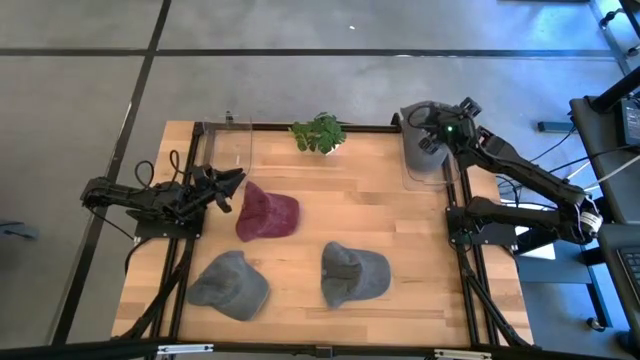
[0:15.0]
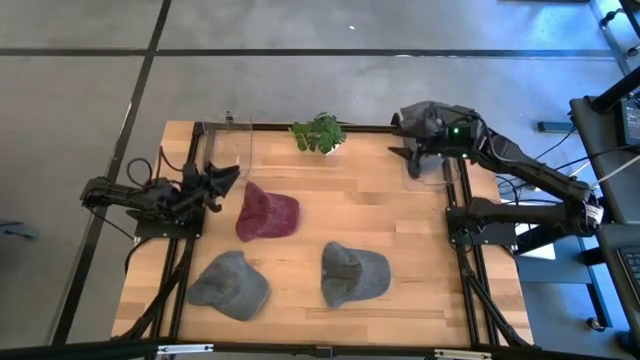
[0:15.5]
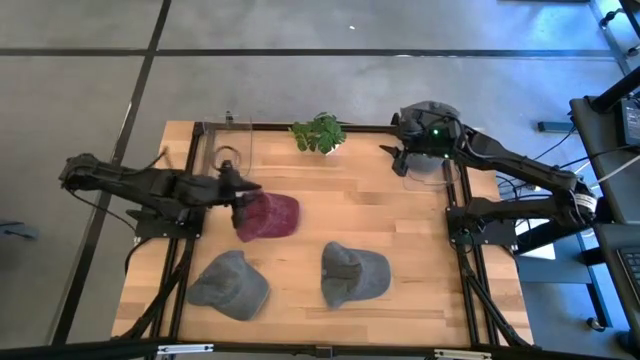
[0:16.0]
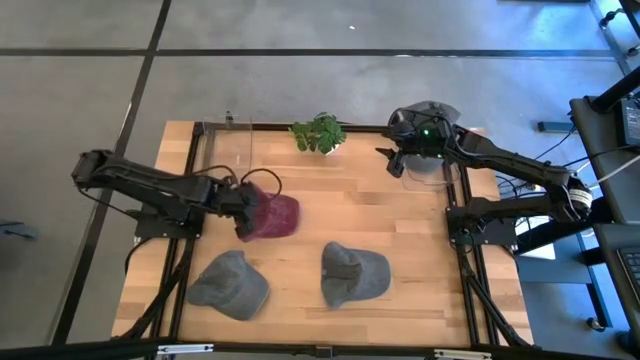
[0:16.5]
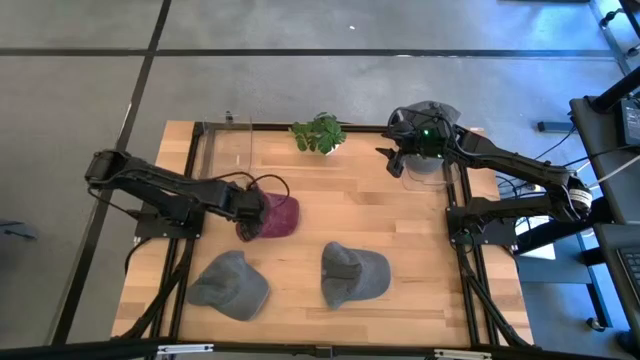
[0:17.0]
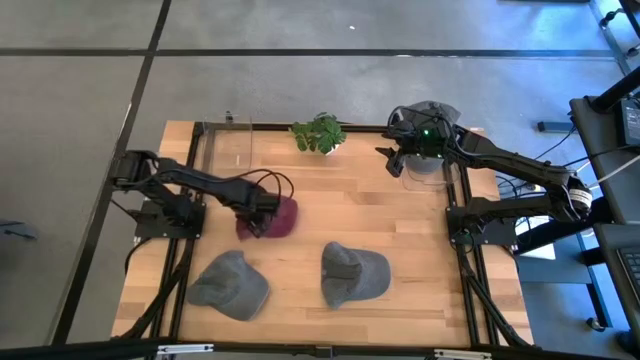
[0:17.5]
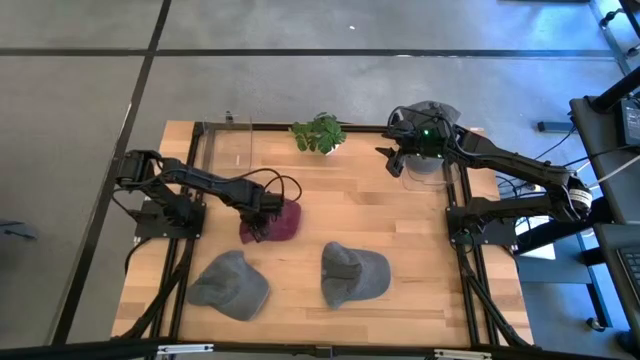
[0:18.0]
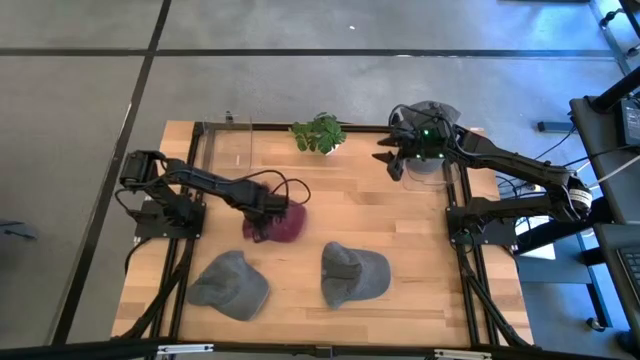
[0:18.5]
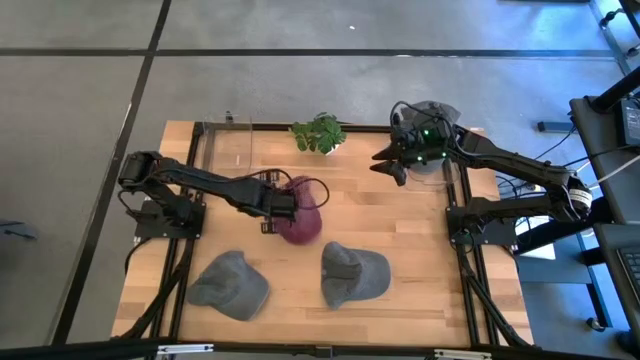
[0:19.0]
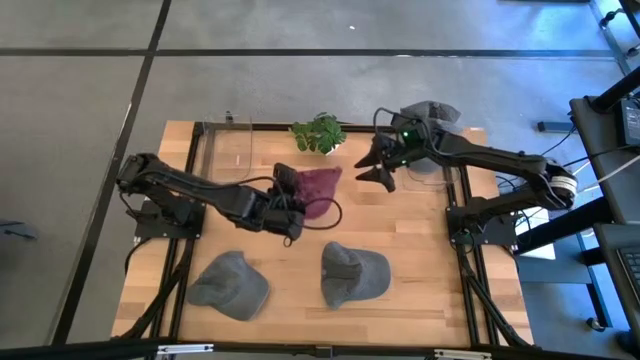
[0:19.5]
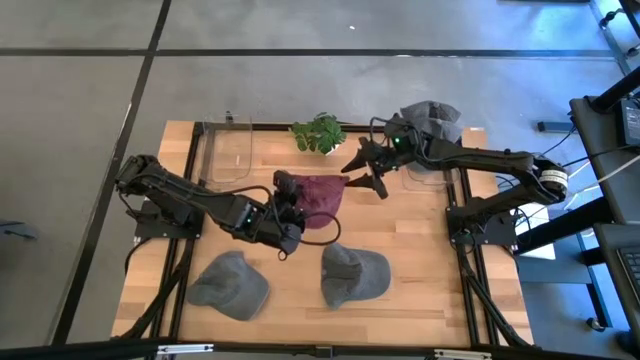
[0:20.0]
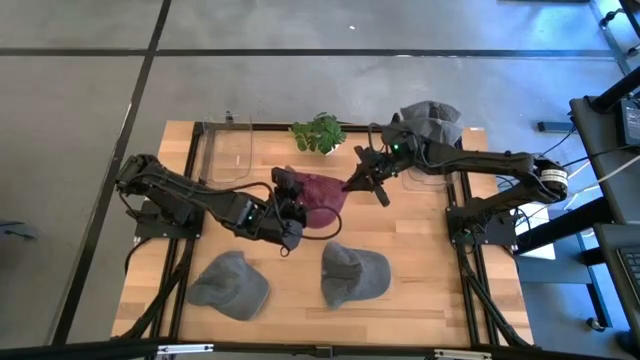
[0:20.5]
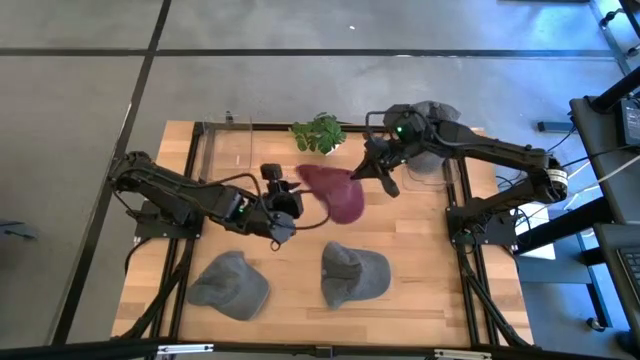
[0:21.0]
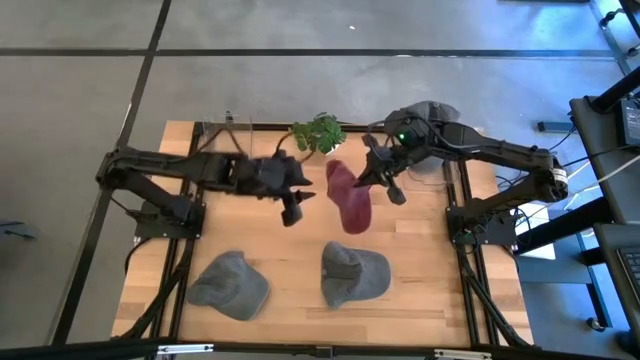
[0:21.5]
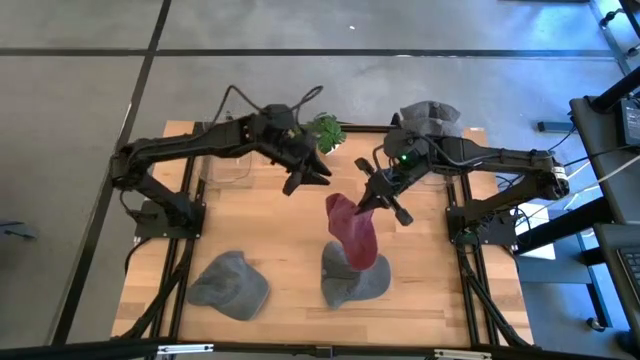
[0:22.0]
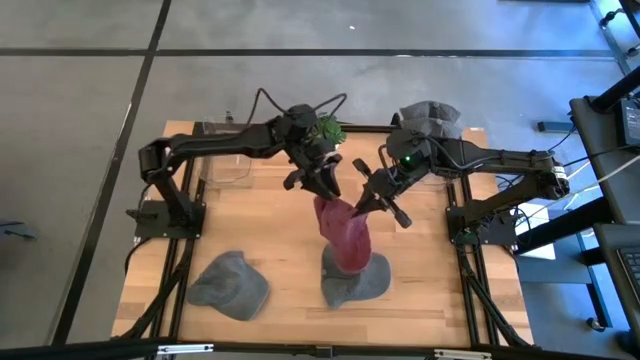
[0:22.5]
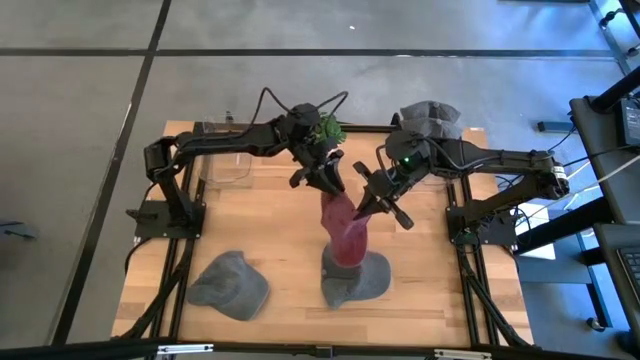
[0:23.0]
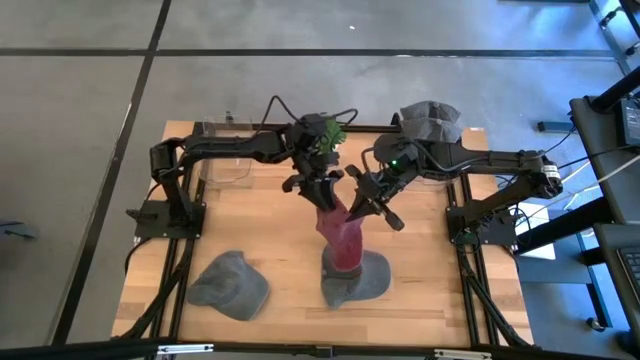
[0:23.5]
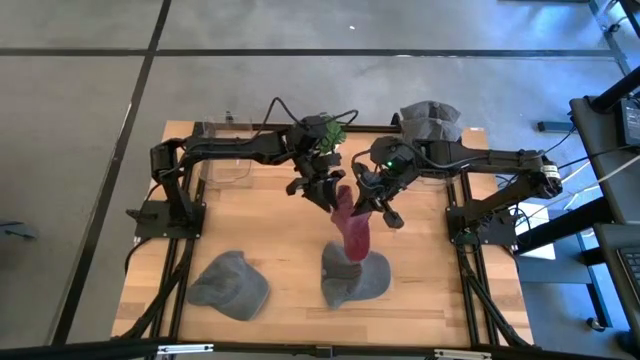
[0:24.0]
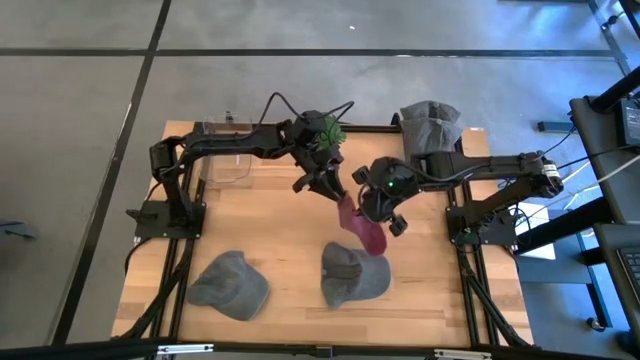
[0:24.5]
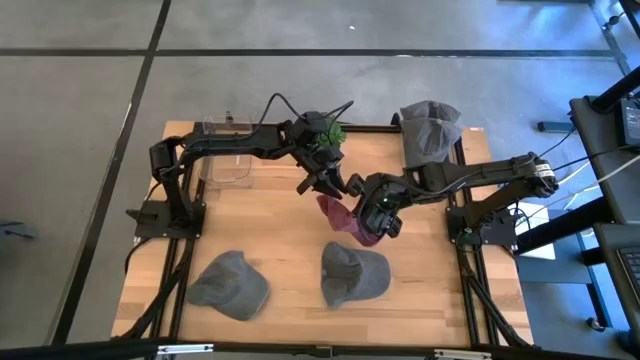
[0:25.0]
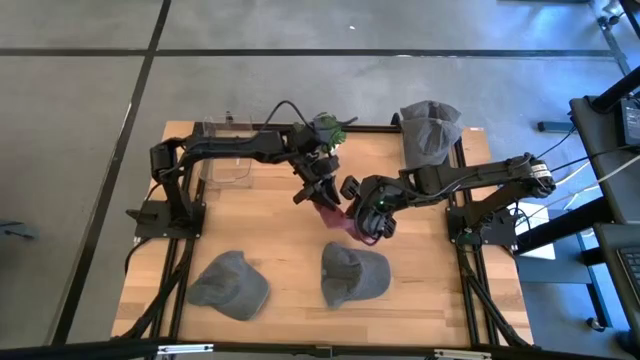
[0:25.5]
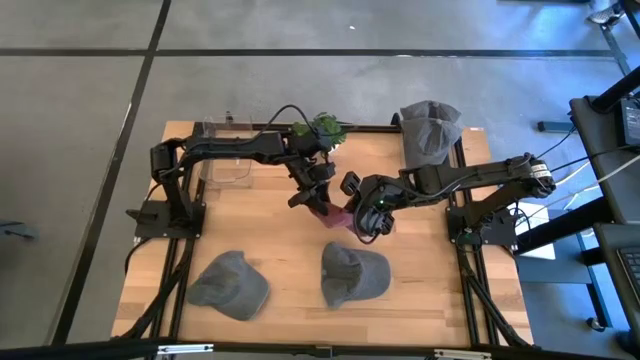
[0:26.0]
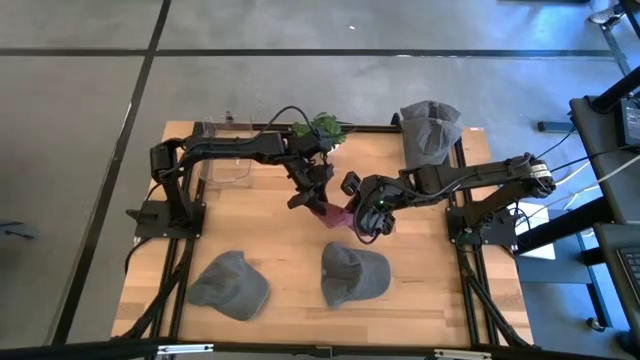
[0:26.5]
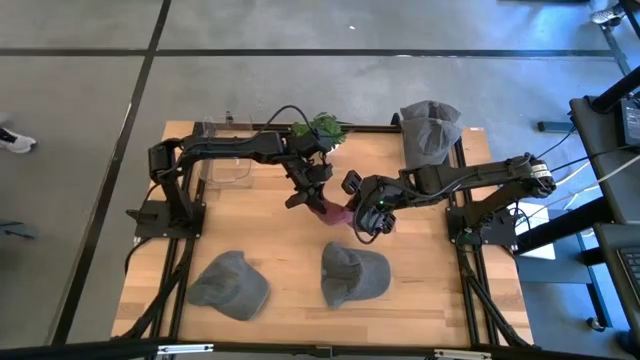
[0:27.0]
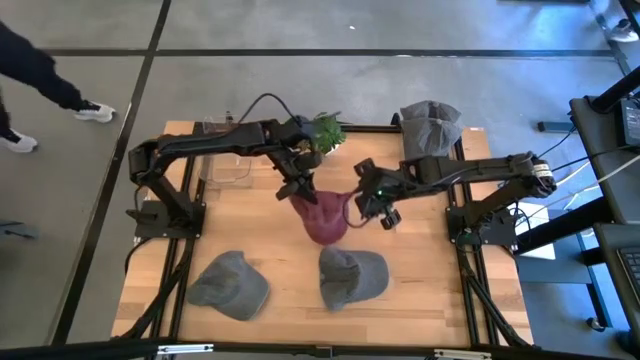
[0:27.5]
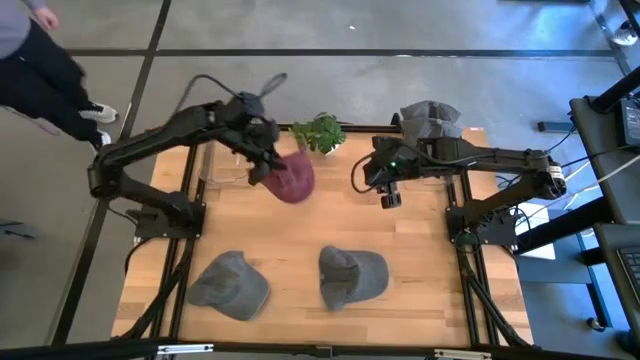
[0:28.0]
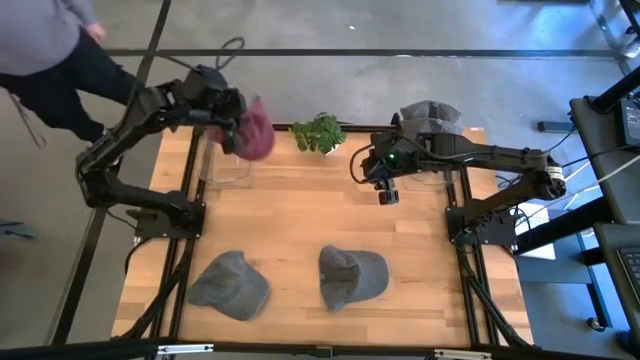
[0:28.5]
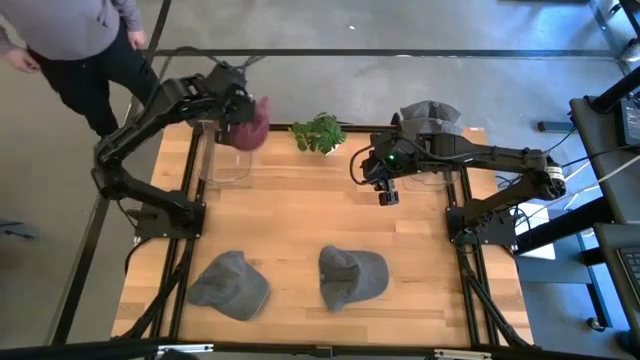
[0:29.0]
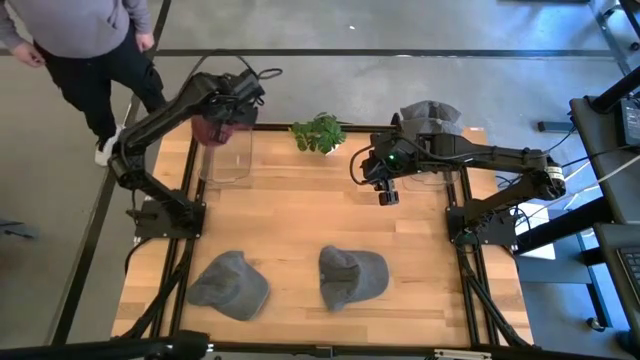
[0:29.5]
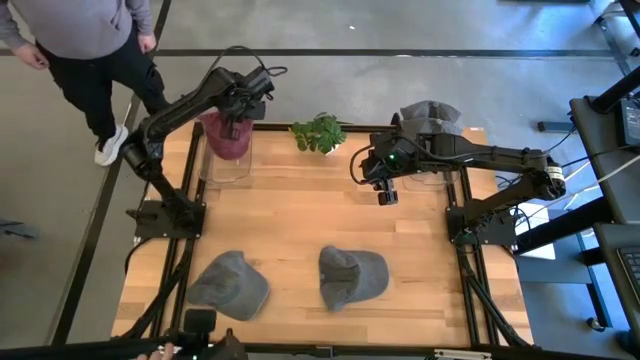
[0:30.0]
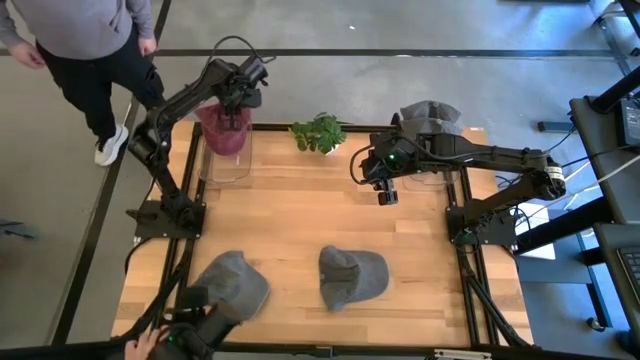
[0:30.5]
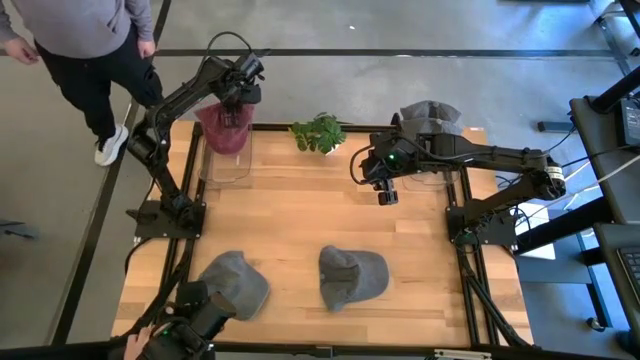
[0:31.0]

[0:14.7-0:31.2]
Task: Pick & Place hat
Put the red cap into the left transparent bin

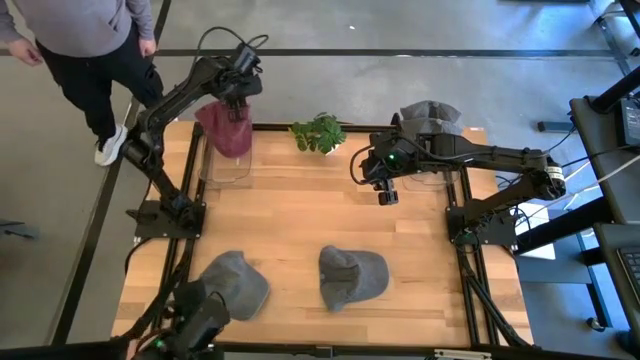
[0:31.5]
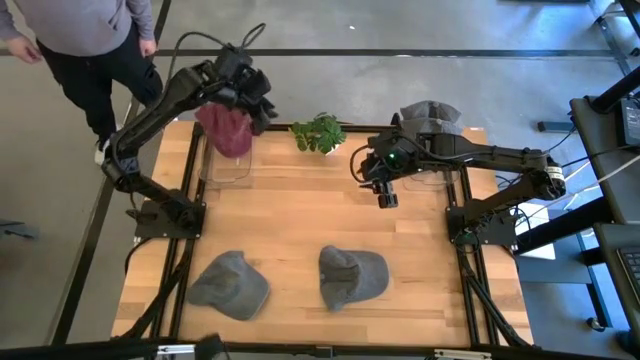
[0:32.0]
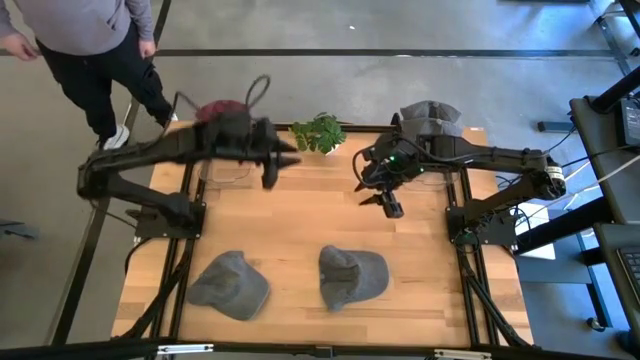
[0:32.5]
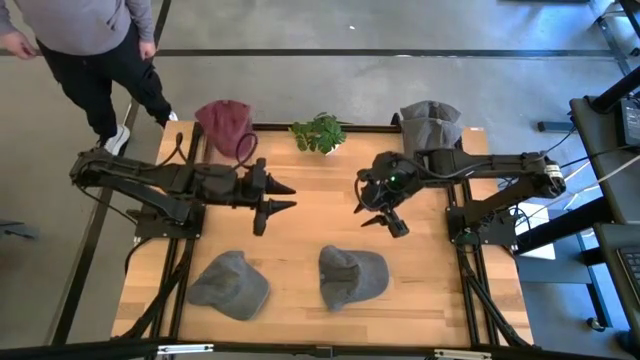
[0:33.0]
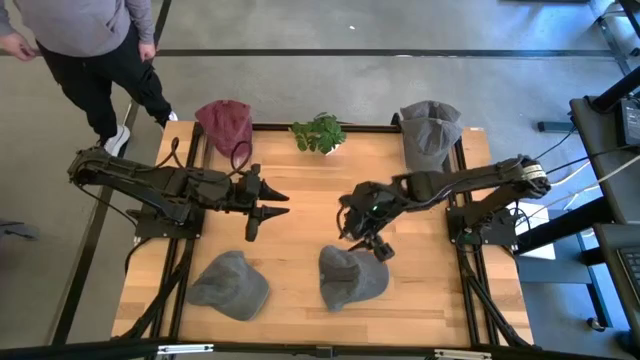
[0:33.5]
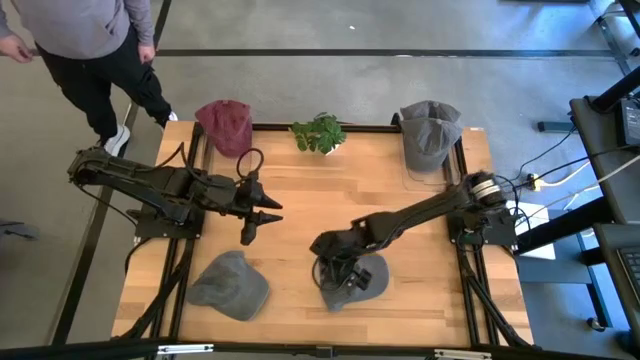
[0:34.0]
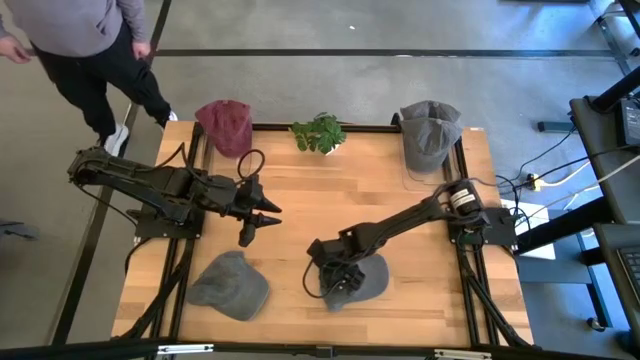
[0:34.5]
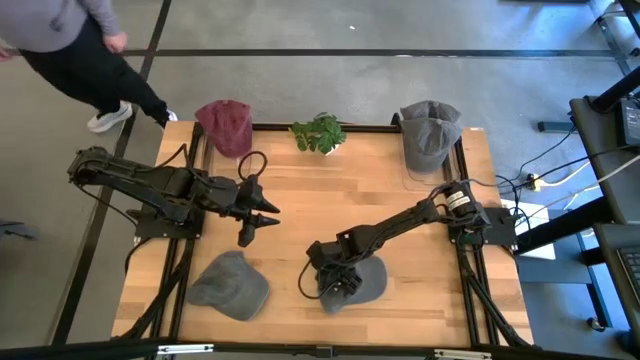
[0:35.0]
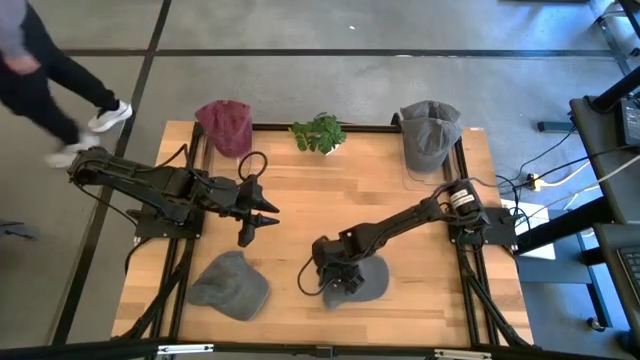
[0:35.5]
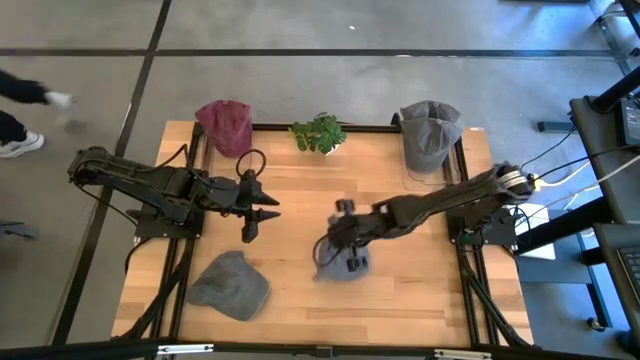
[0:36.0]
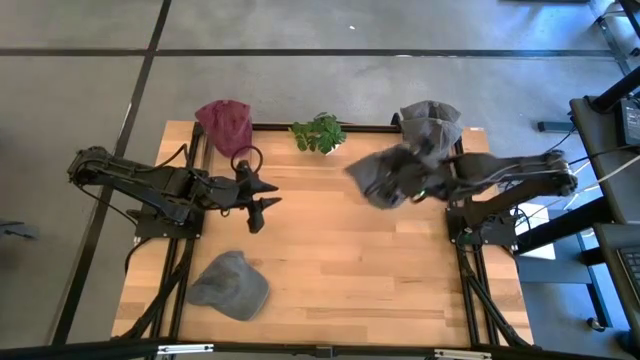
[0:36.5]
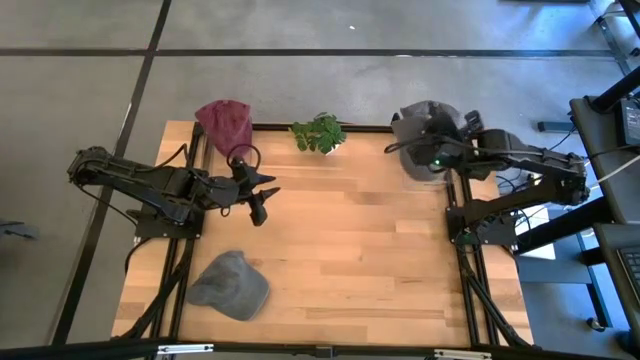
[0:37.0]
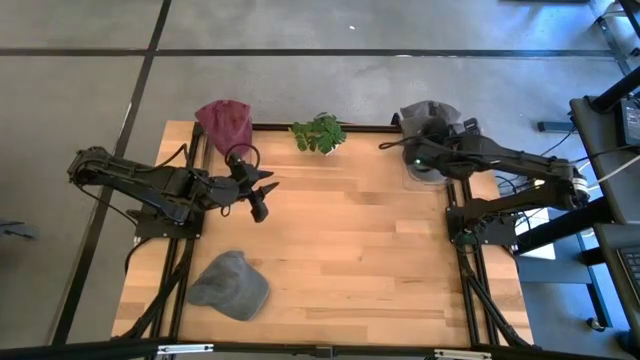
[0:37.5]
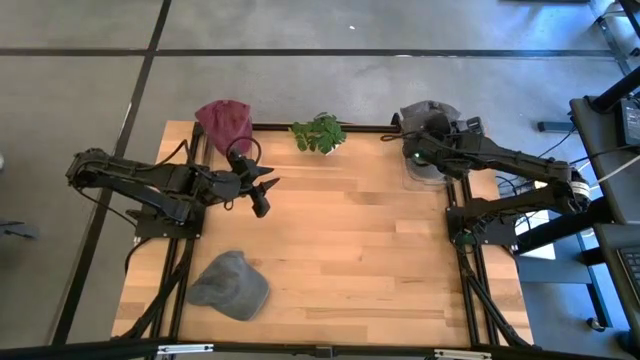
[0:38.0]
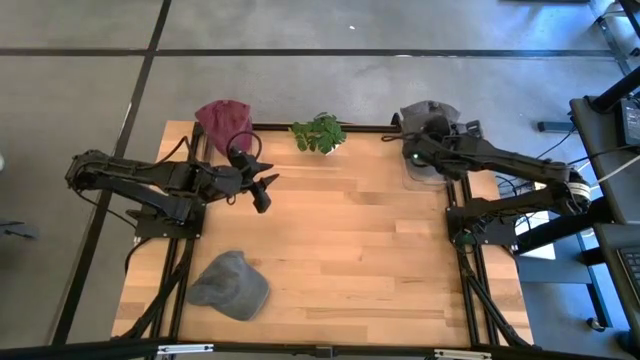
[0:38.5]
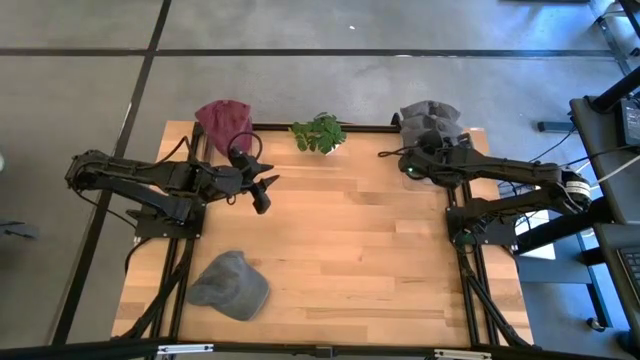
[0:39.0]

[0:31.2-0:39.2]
Put the gray cap into the right transparent bin
